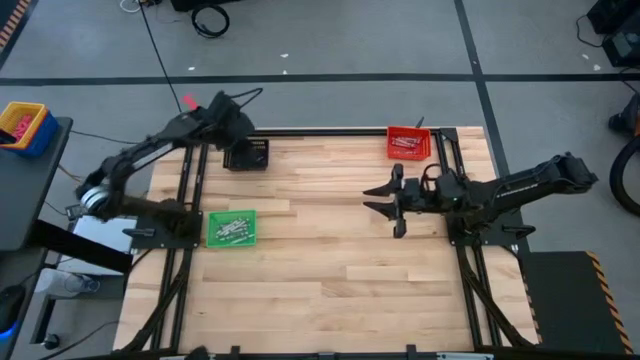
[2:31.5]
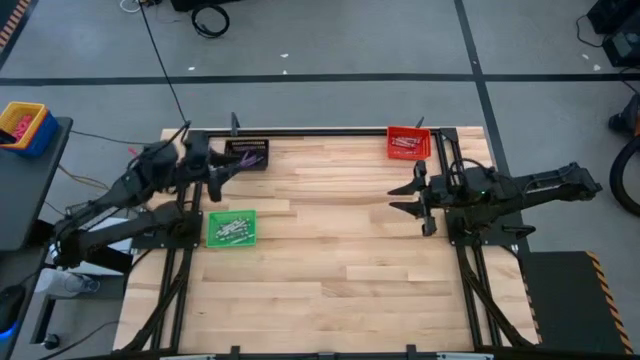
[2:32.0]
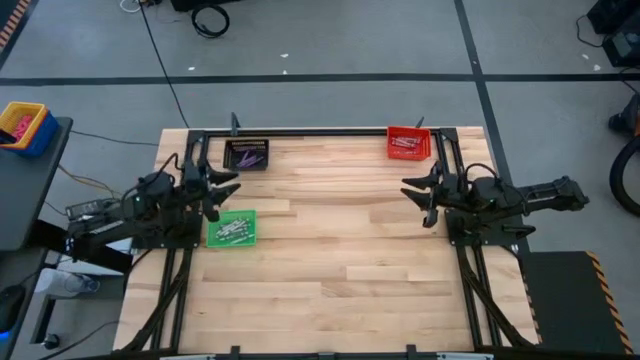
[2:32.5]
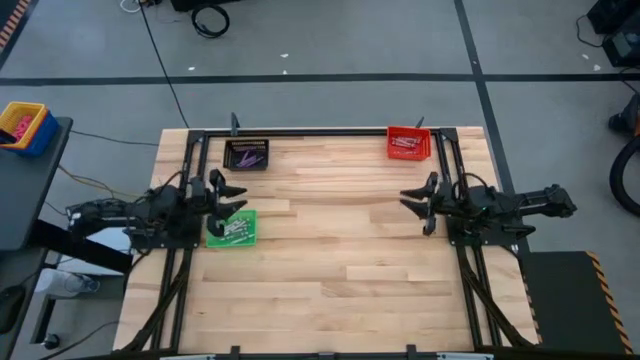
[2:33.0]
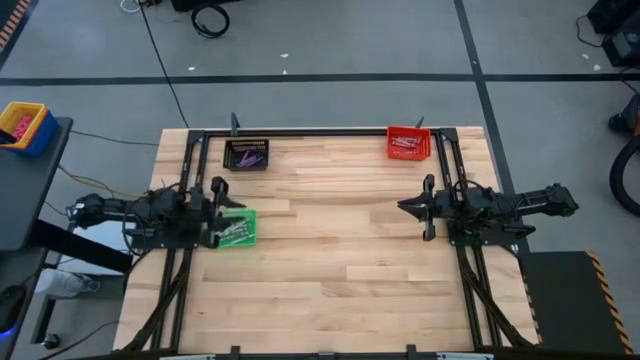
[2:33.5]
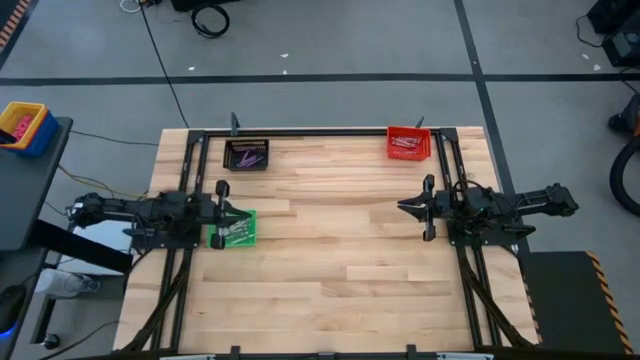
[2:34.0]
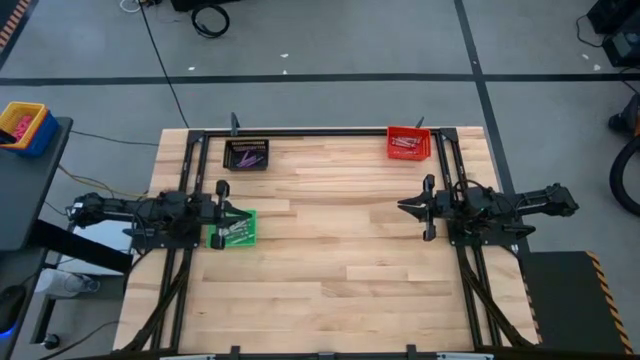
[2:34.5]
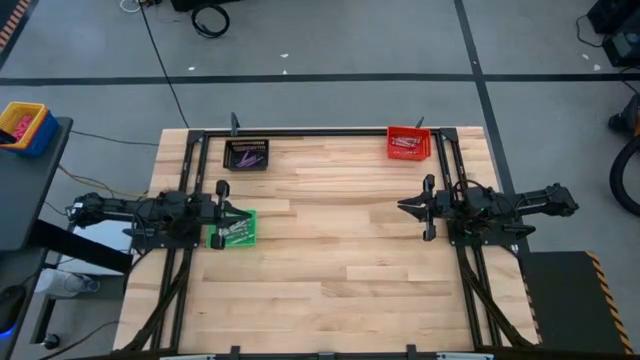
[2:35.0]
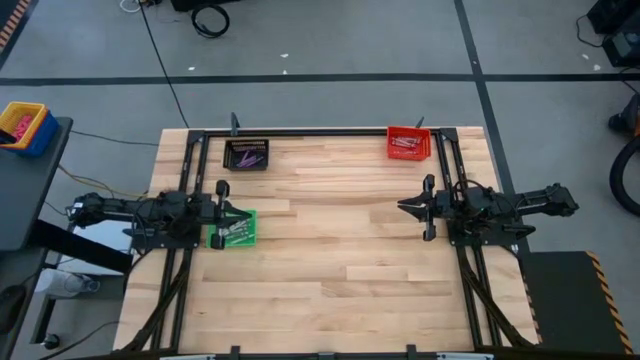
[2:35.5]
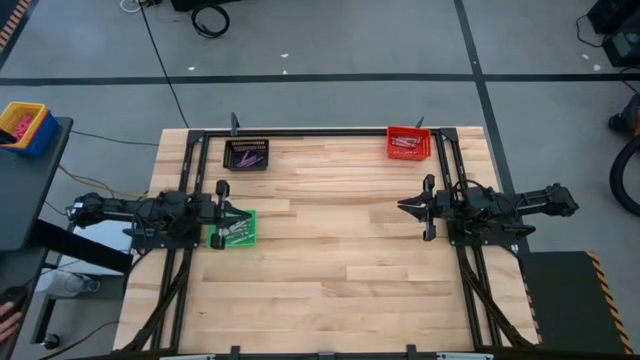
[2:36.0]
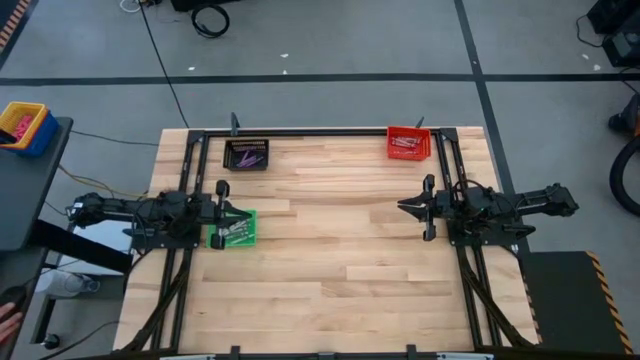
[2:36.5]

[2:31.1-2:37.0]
Task: Sort crayons
Return to Home Position

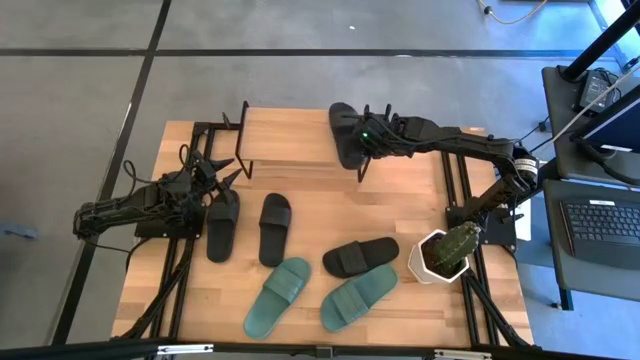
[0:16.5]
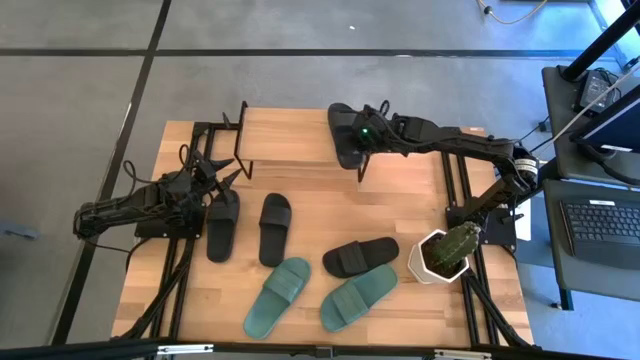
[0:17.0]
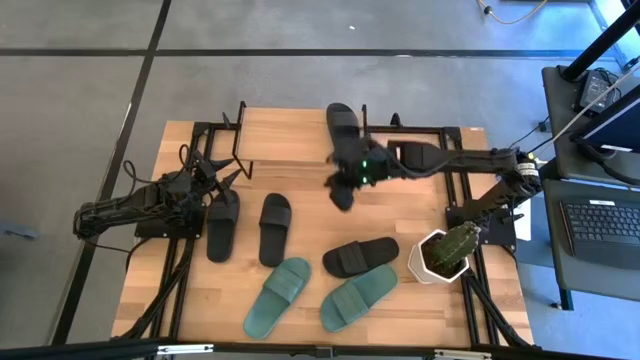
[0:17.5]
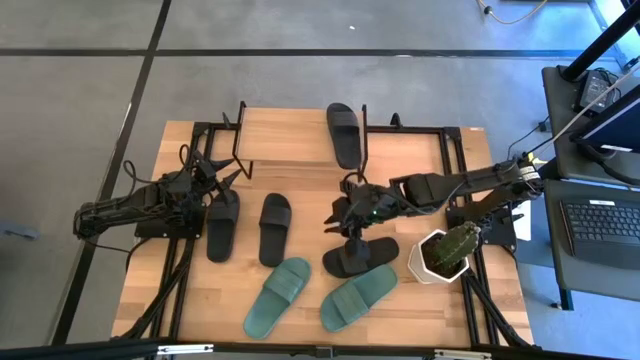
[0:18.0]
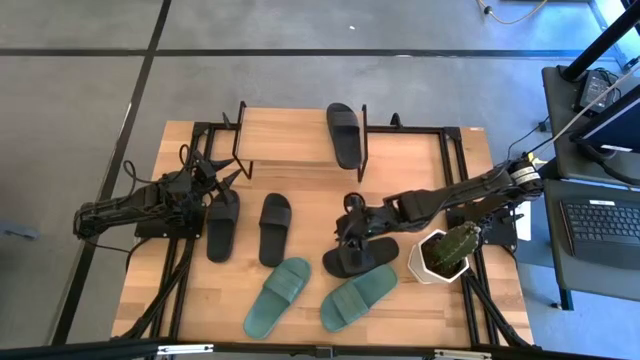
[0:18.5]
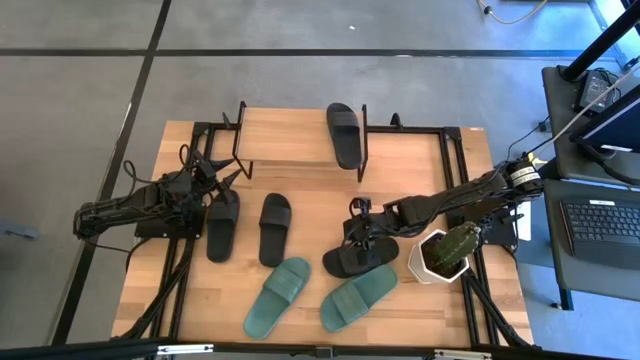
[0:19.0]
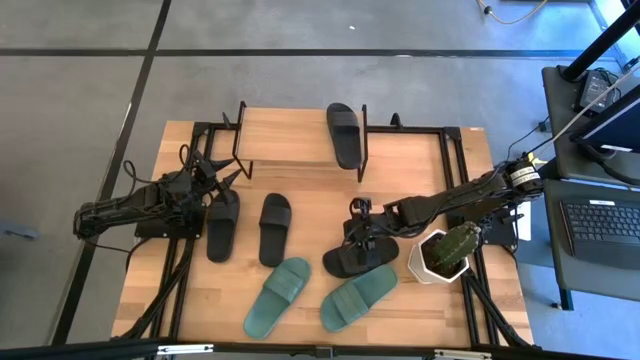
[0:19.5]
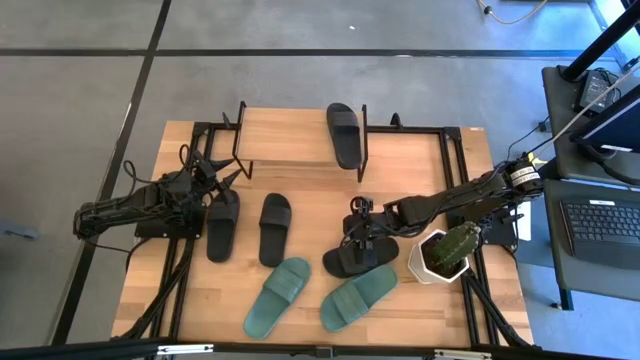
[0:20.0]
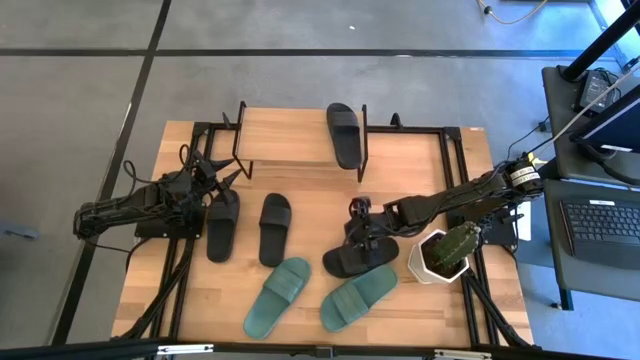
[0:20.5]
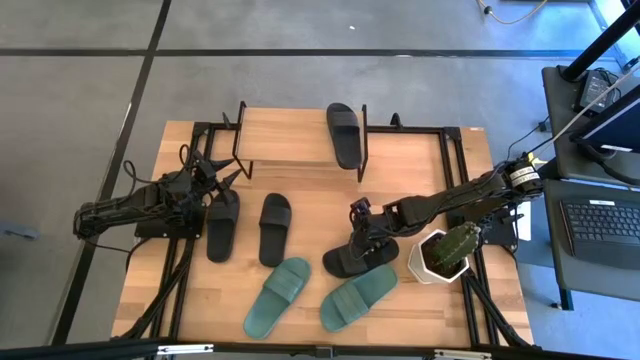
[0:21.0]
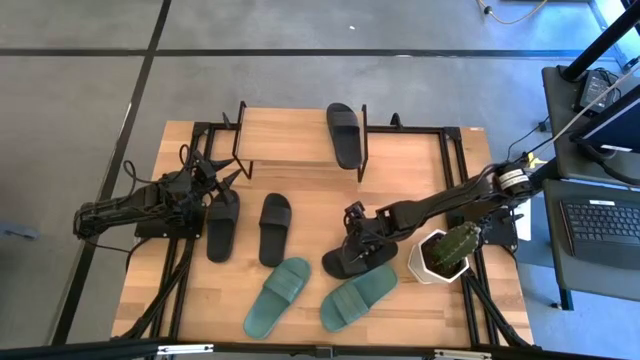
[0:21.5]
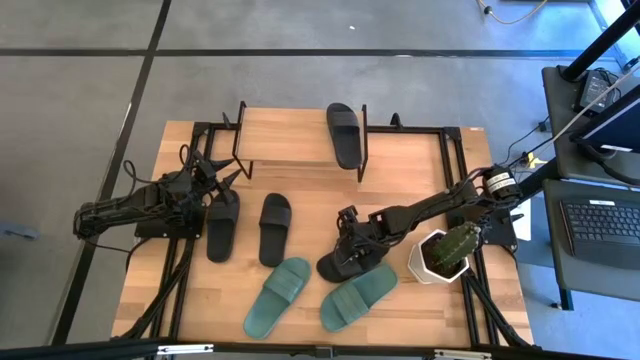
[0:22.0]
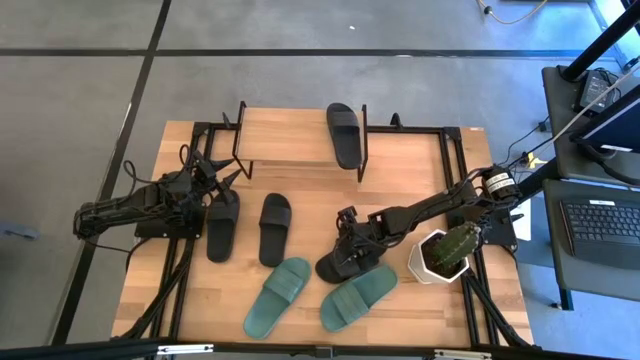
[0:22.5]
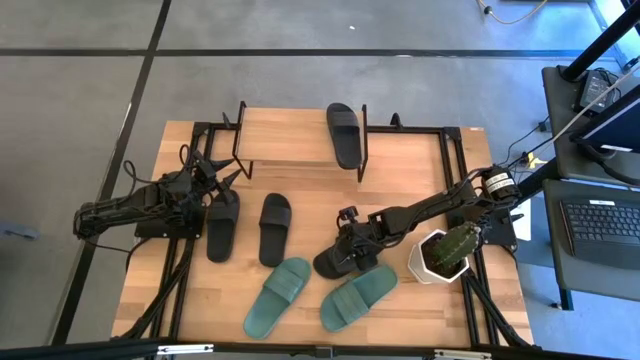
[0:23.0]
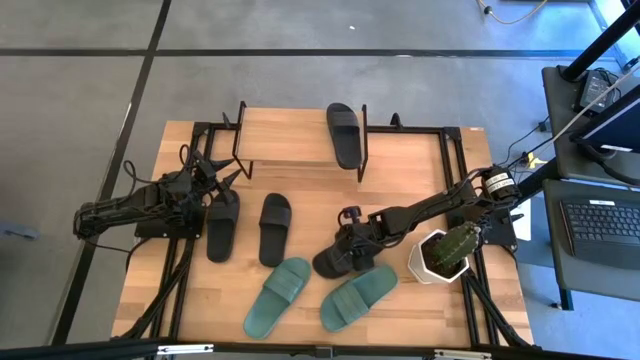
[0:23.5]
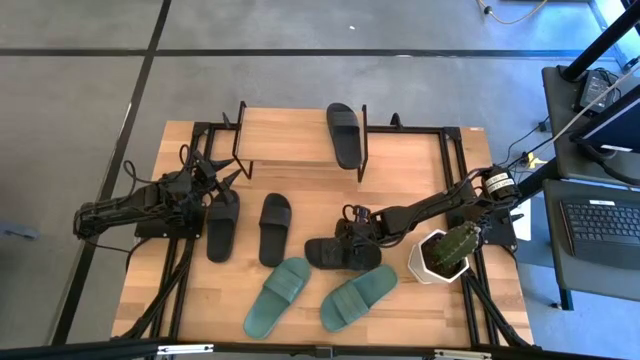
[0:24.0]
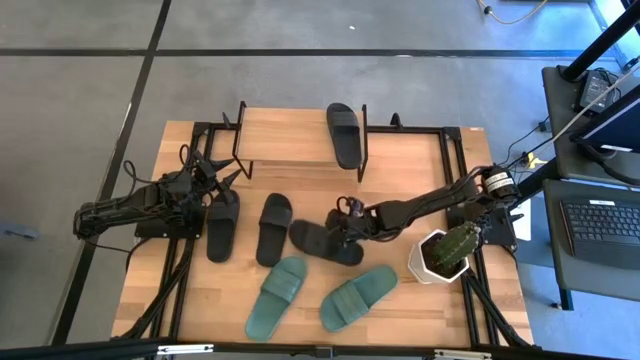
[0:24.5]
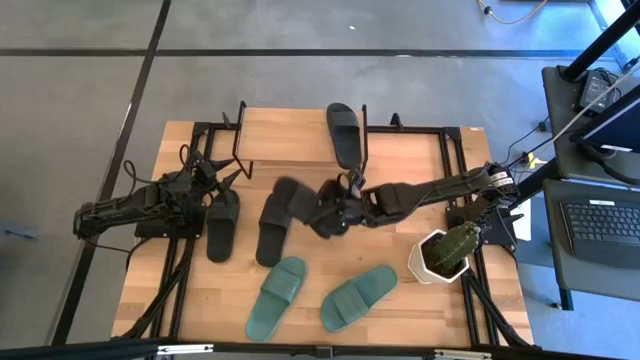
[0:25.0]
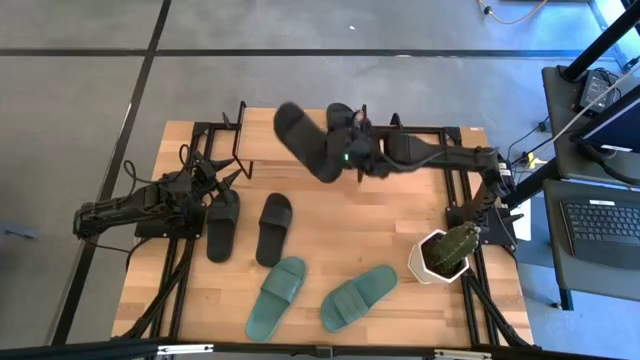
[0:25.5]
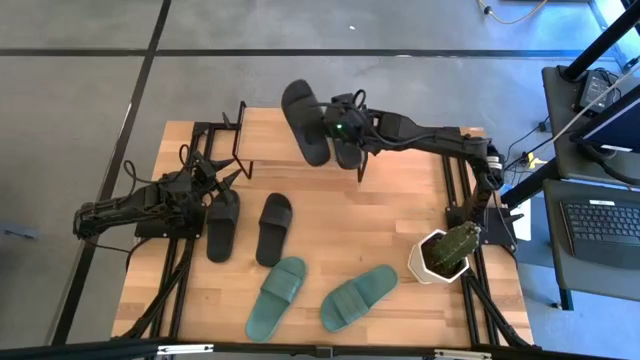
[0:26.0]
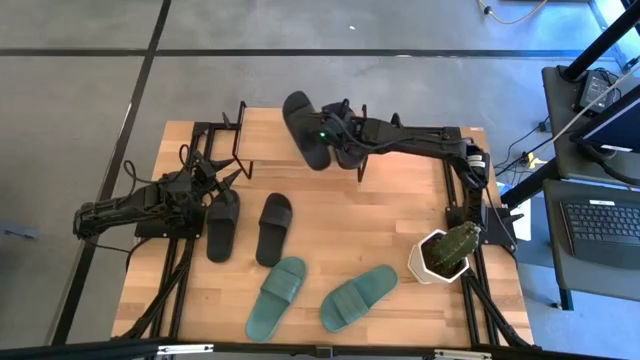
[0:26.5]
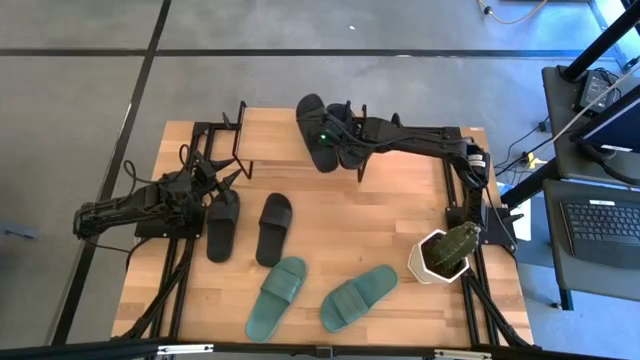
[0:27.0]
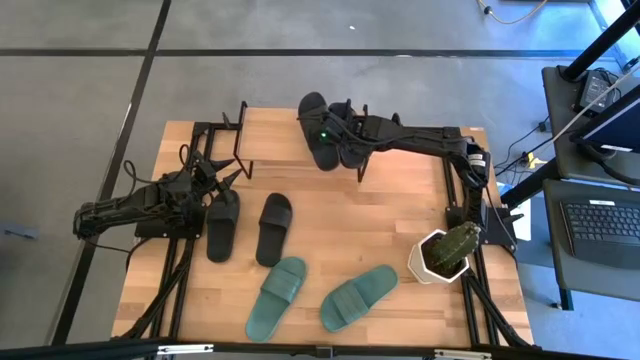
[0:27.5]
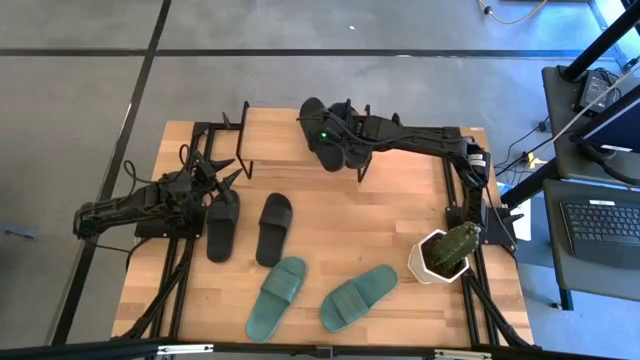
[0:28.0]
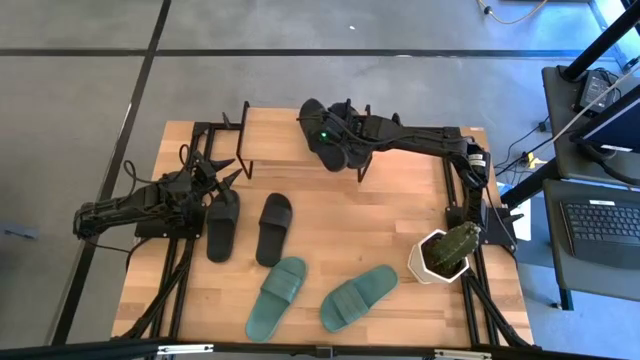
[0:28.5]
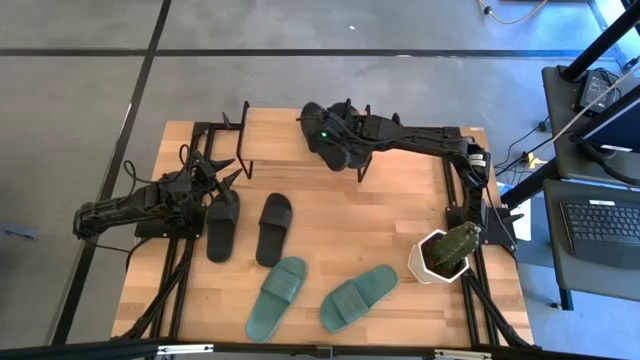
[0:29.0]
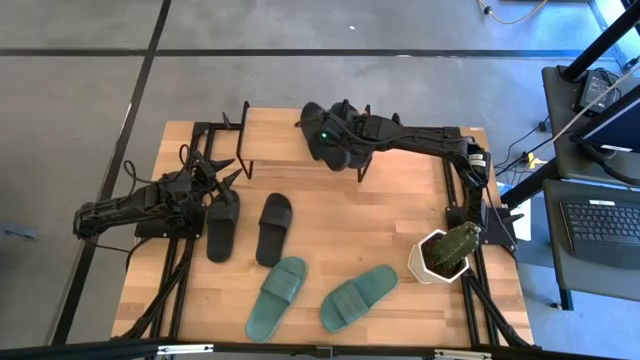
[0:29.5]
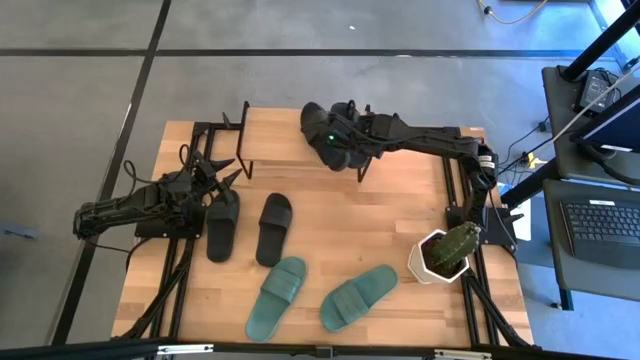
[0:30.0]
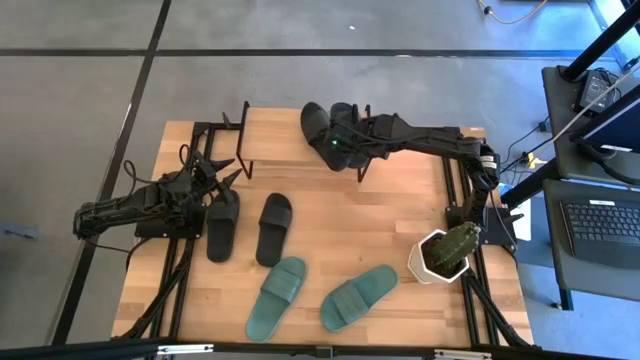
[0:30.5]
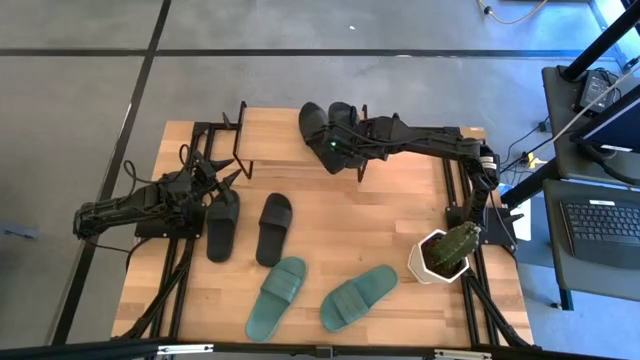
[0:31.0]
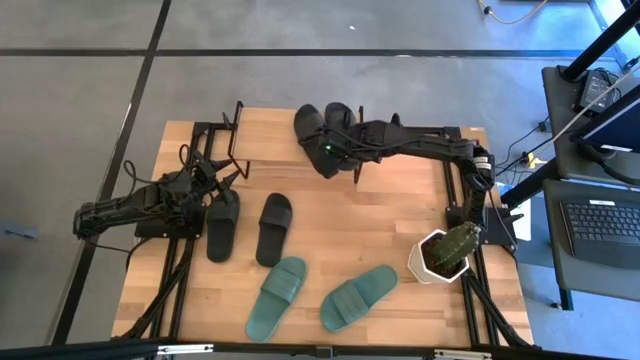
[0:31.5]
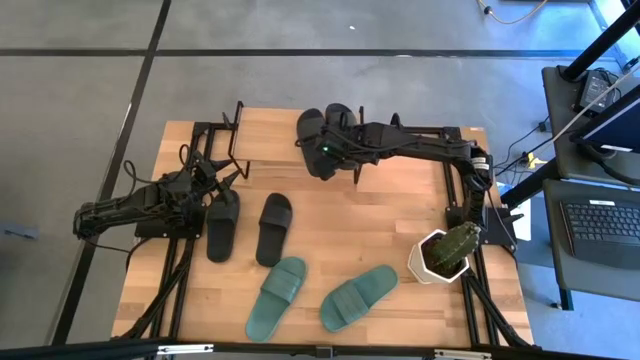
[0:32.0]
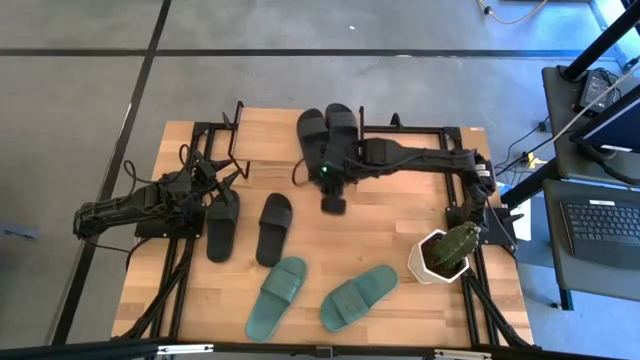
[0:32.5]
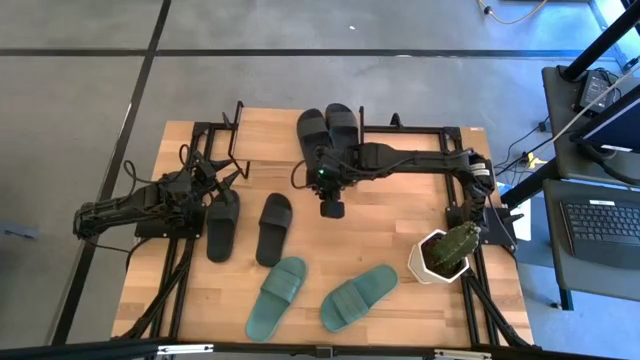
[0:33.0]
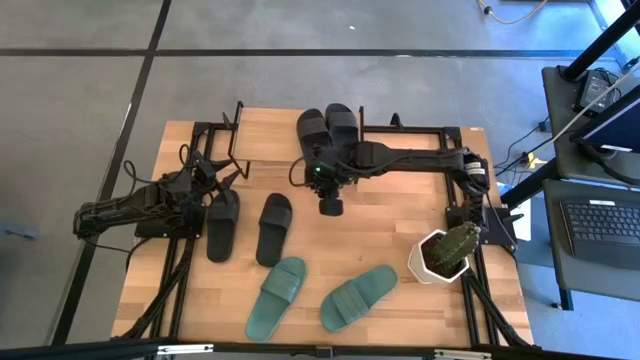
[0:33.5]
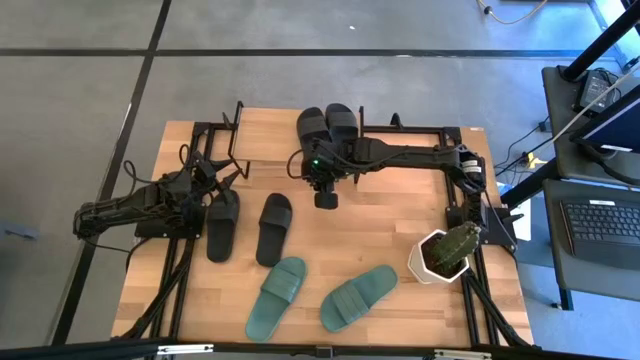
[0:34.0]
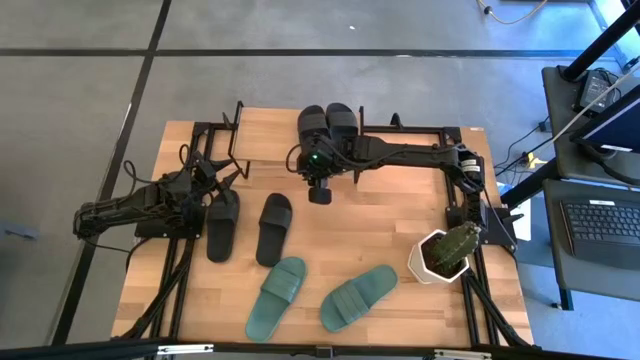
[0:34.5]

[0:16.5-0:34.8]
Task: Pick and place slides into the shelf
Put the black slide on the shelf
